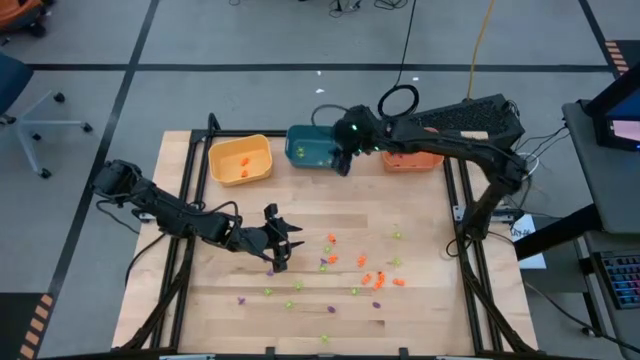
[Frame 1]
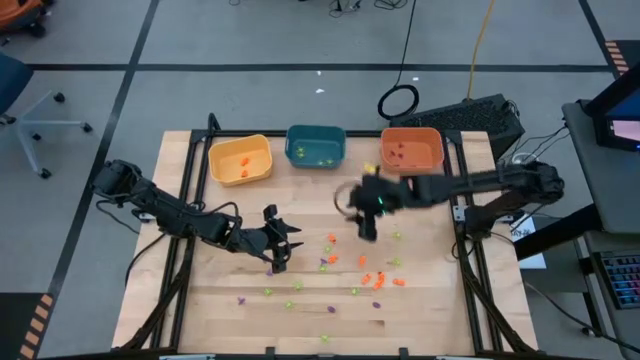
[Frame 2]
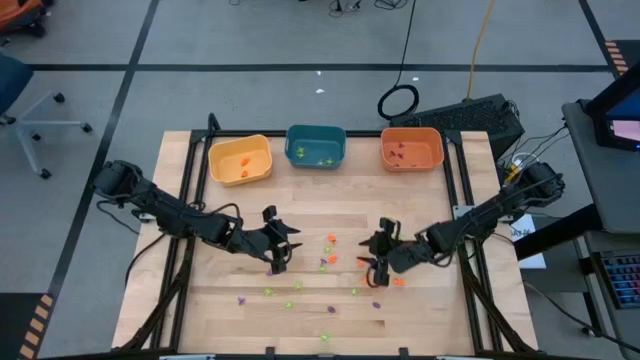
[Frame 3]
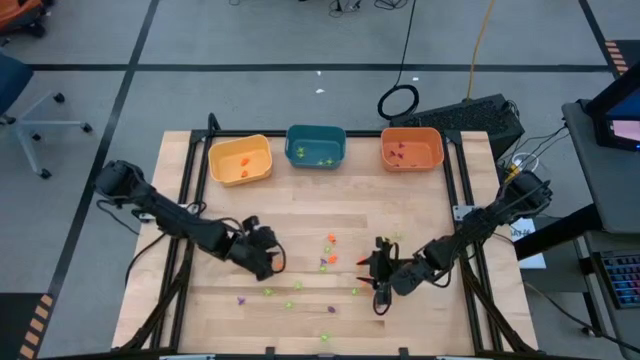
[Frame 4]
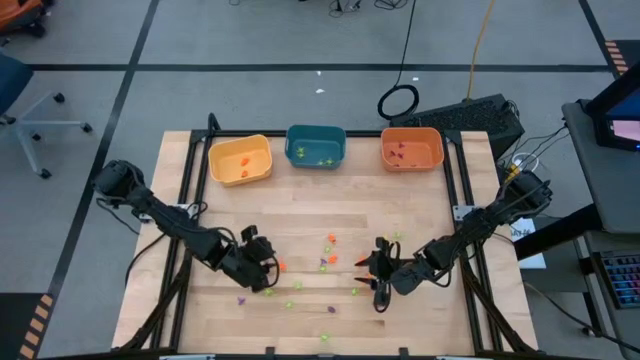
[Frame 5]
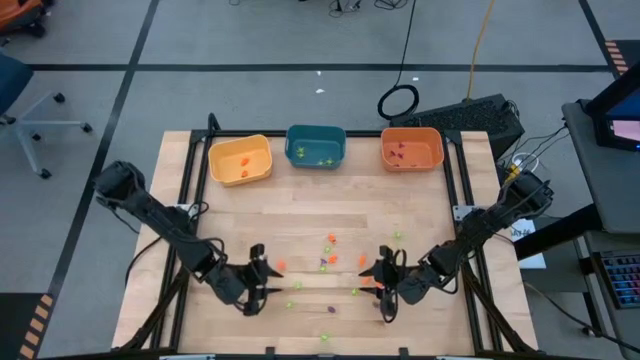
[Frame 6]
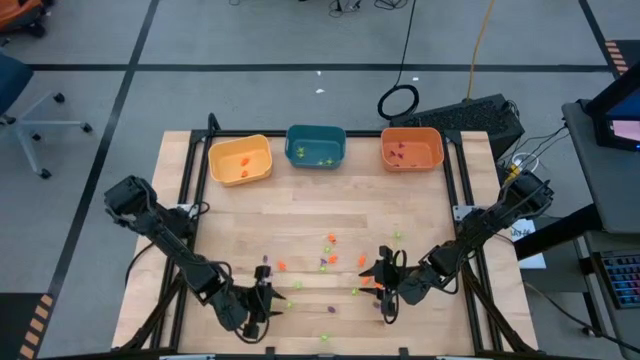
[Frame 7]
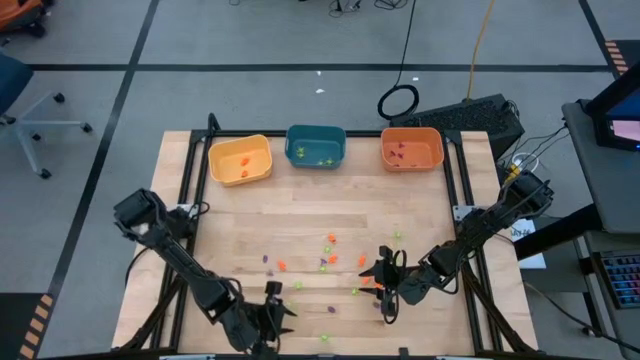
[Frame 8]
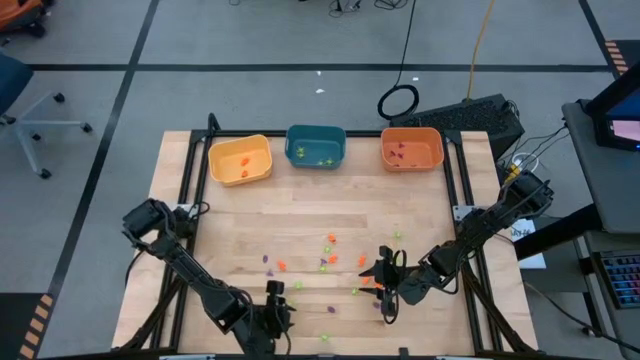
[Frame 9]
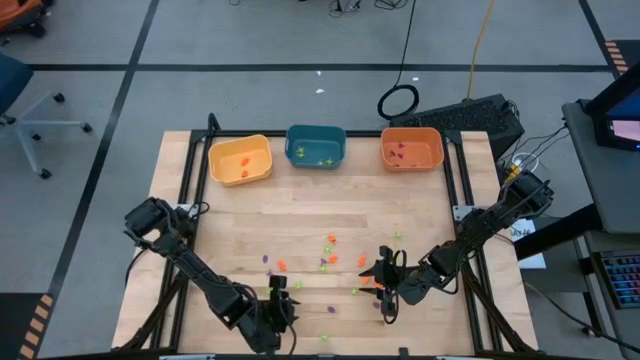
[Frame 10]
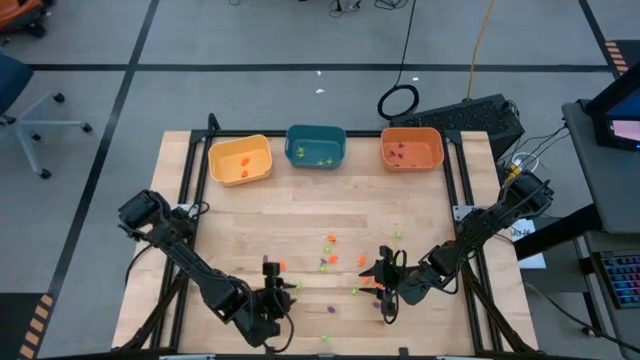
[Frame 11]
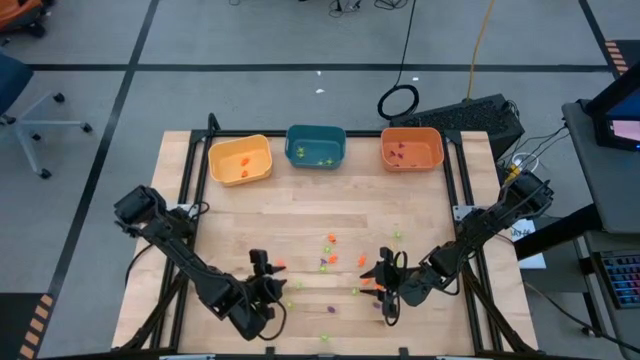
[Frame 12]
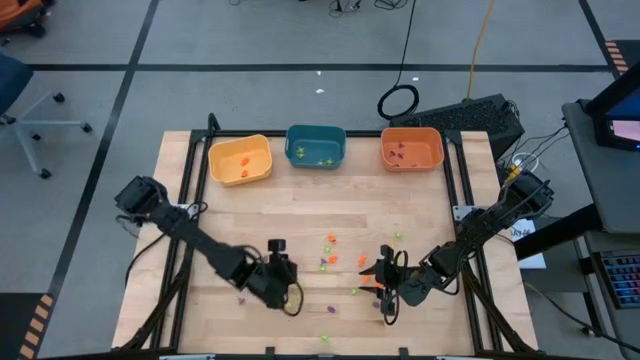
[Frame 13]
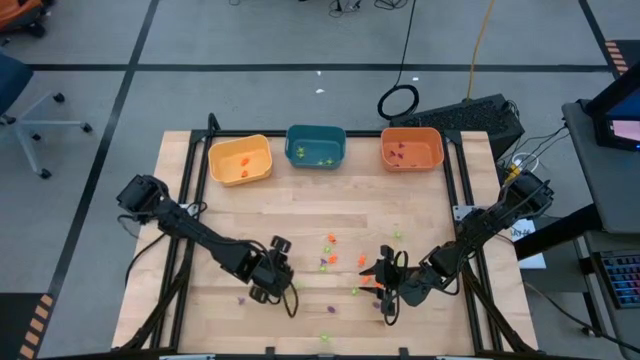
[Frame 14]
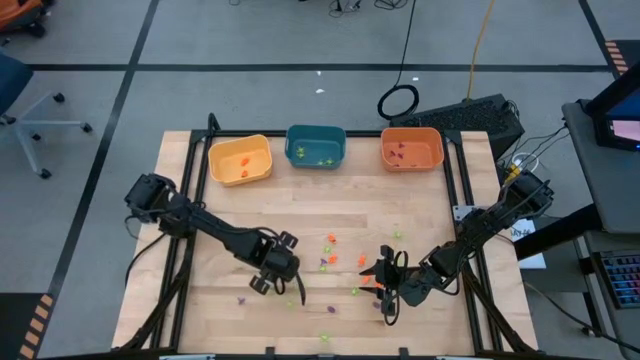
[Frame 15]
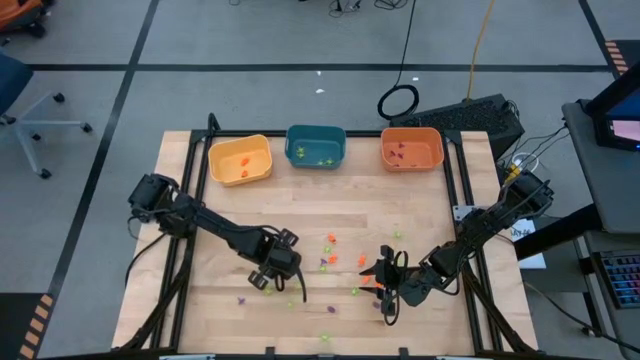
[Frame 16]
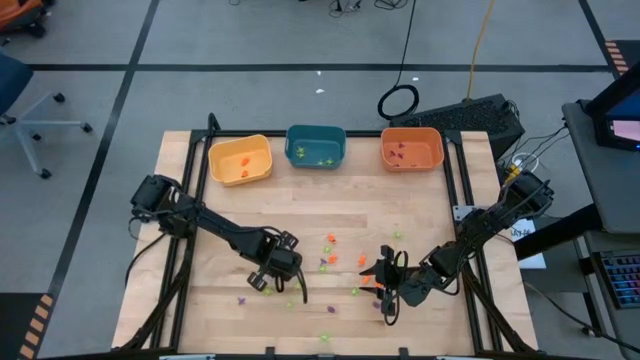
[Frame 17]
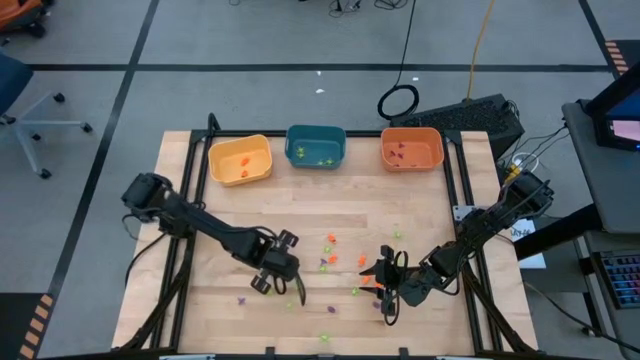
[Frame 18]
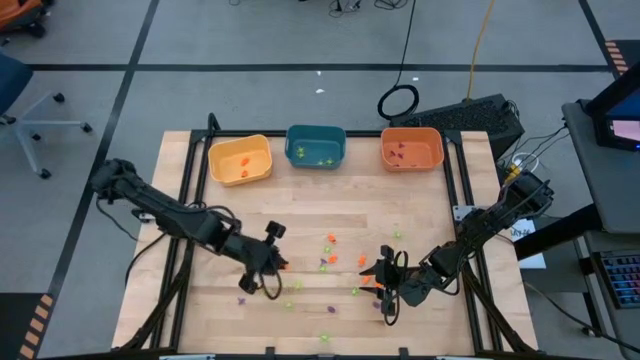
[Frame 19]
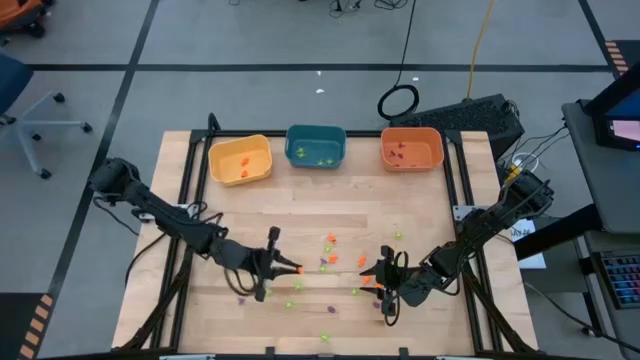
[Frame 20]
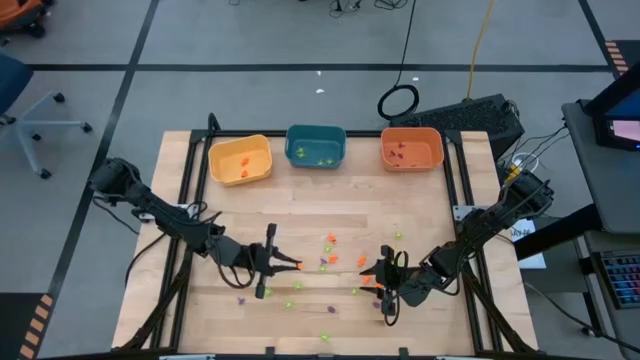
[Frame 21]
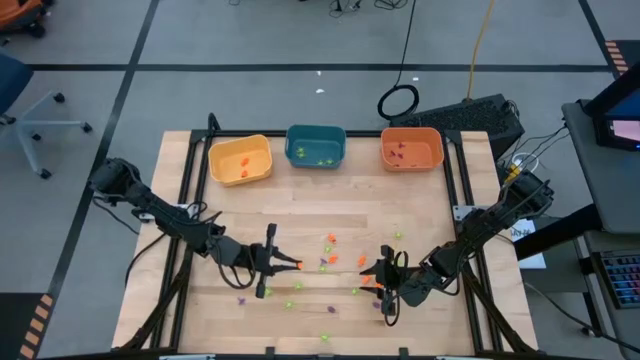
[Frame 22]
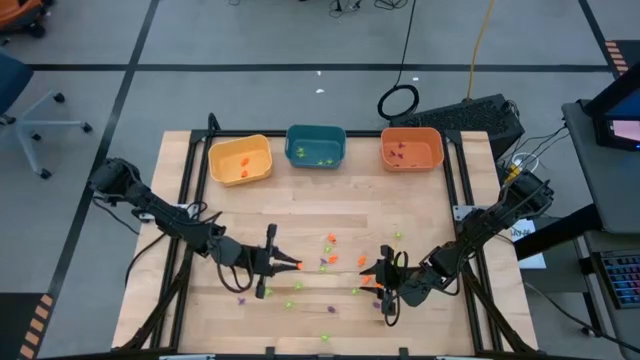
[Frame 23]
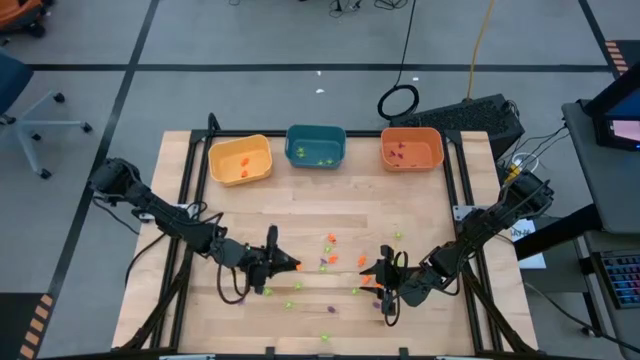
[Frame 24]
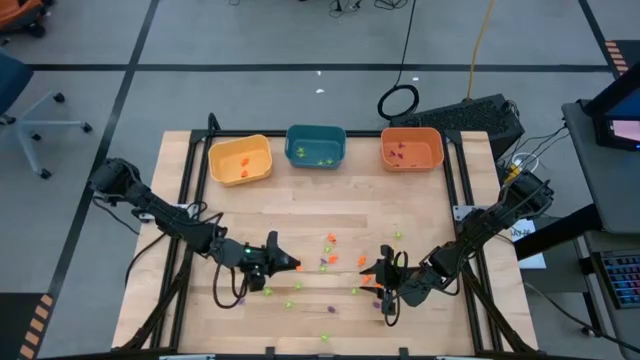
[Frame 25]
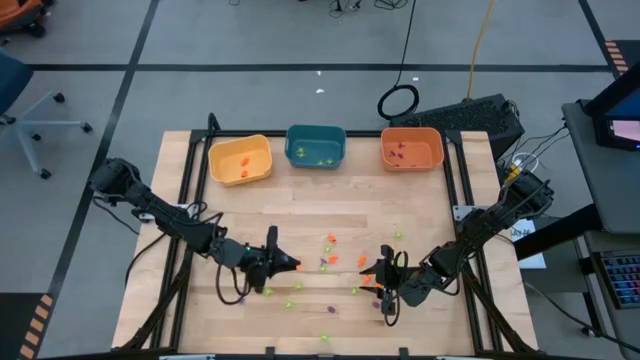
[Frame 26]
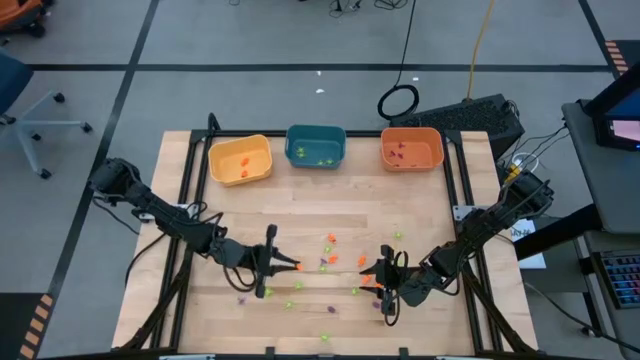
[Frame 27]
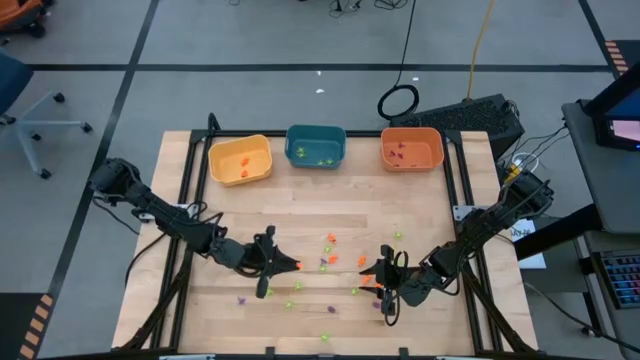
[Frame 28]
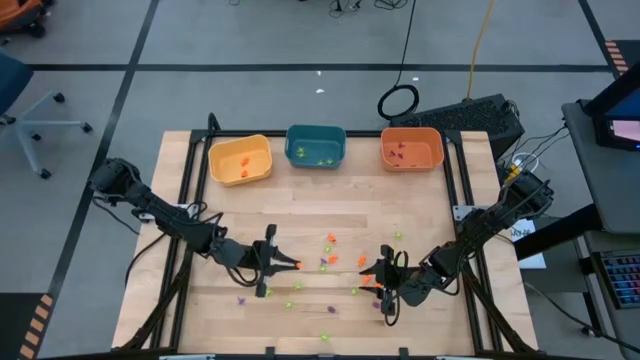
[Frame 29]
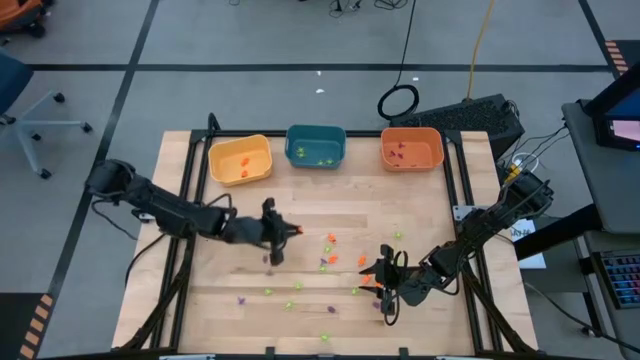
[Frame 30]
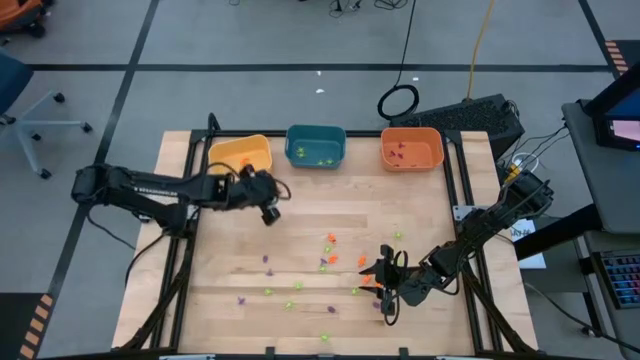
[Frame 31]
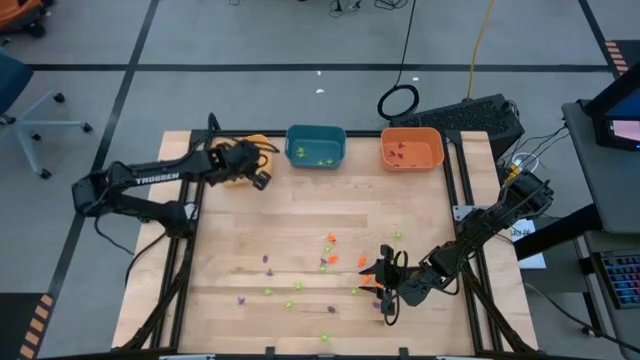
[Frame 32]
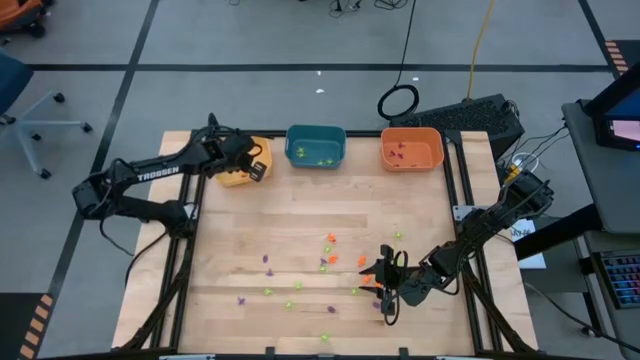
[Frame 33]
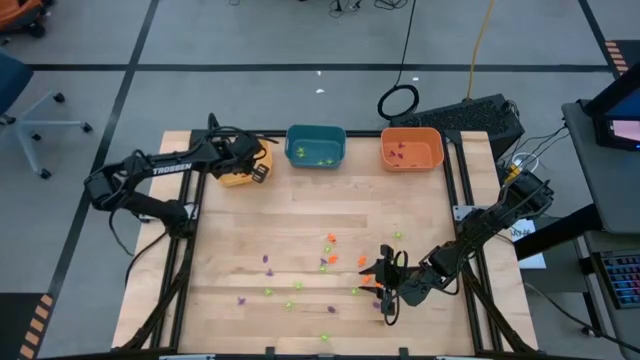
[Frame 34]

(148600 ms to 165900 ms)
Task: Sort Halloween decoration
Put the orange skeleton into the orange bin

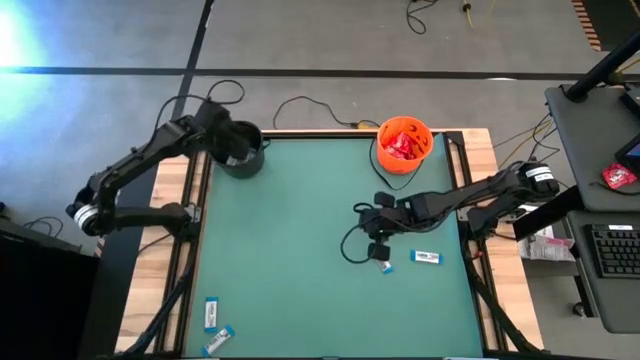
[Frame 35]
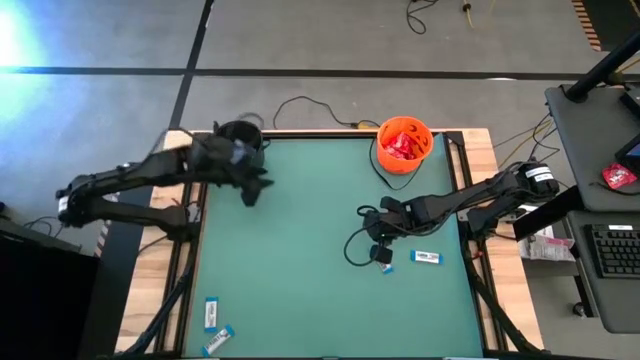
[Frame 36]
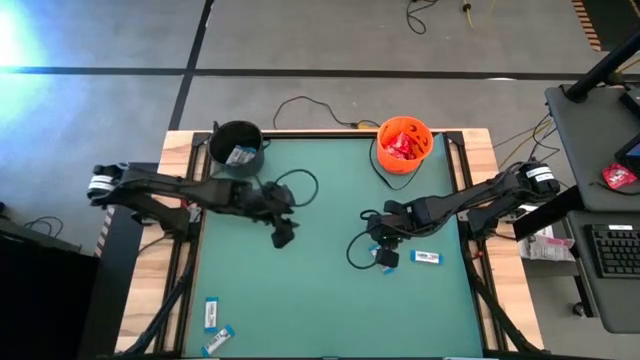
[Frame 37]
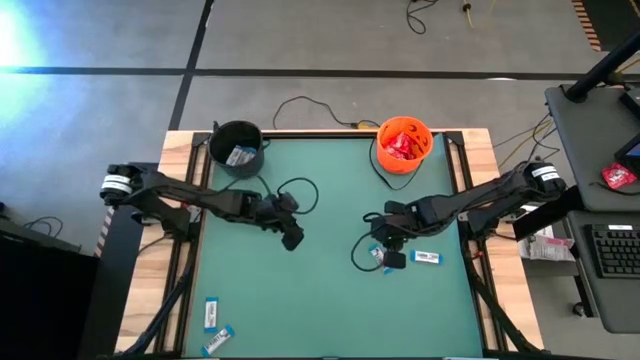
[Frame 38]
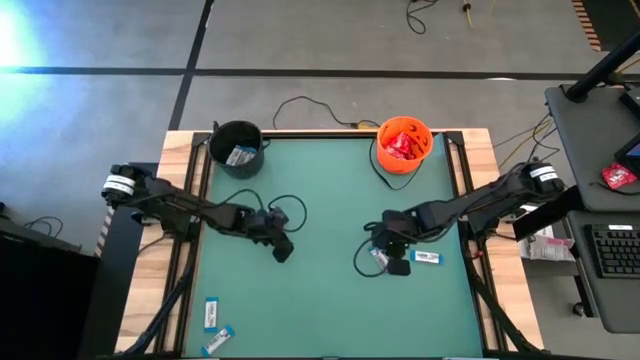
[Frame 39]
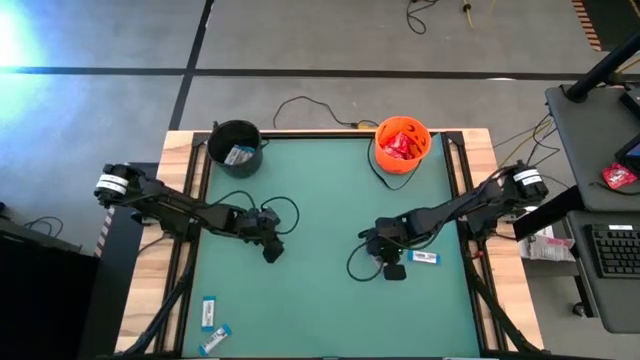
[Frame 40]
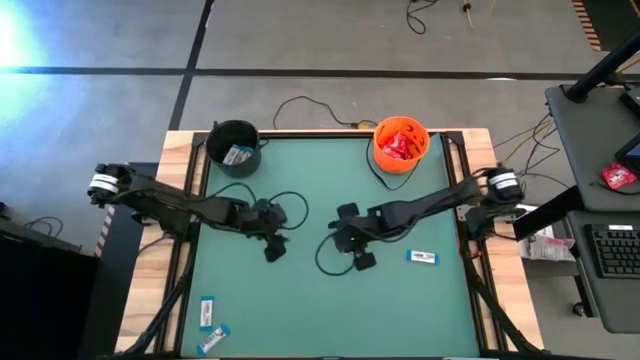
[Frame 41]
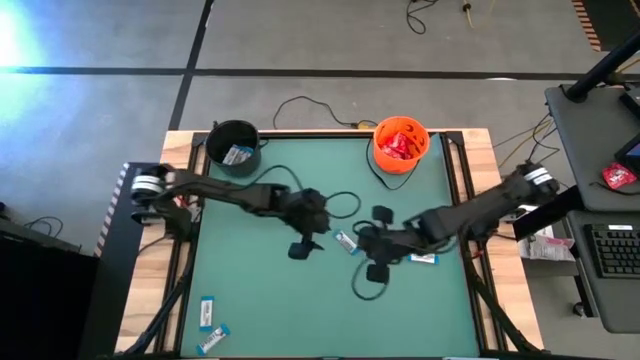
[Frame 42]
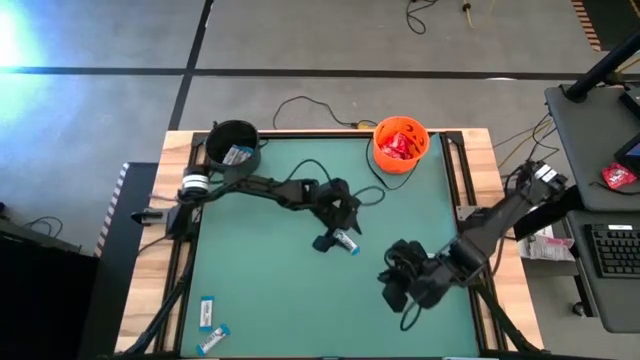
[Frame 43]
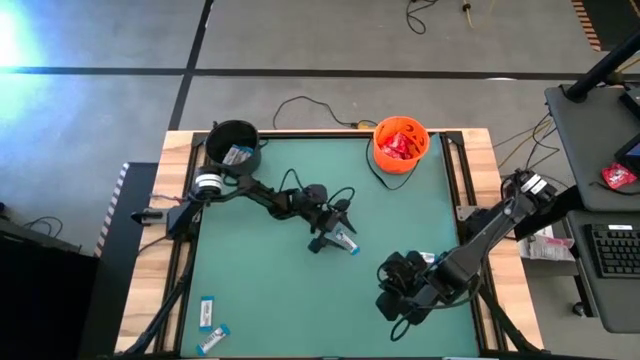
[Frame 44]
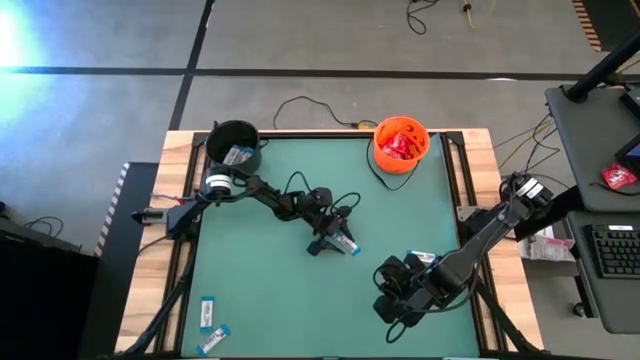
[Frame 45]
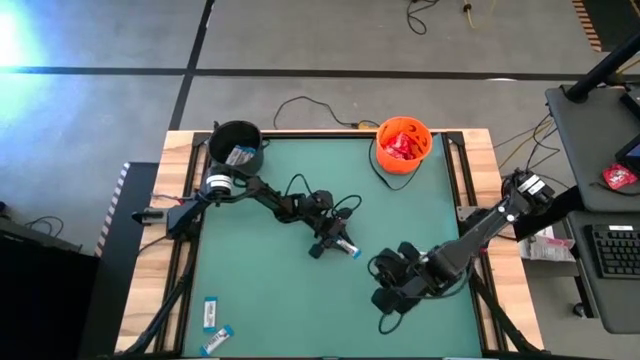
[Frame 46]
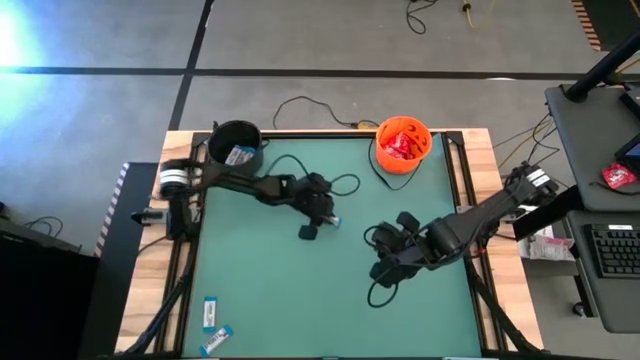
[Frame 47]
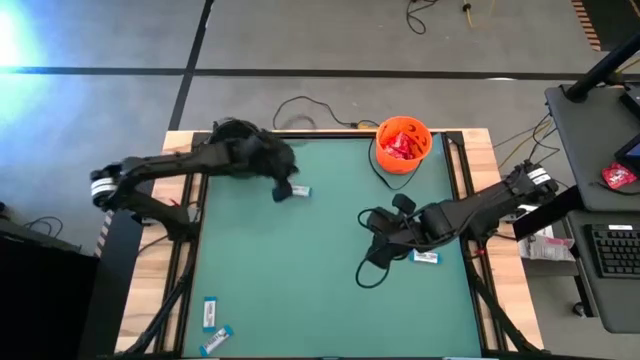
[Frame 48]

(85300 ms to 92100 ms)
Task: Sort candy by brand, put in halloween buckets
Put the white candy into the black bucket
